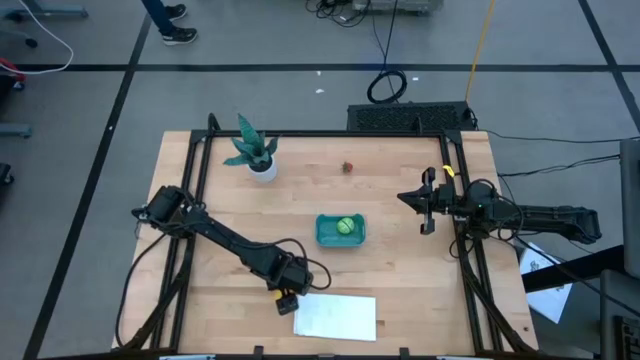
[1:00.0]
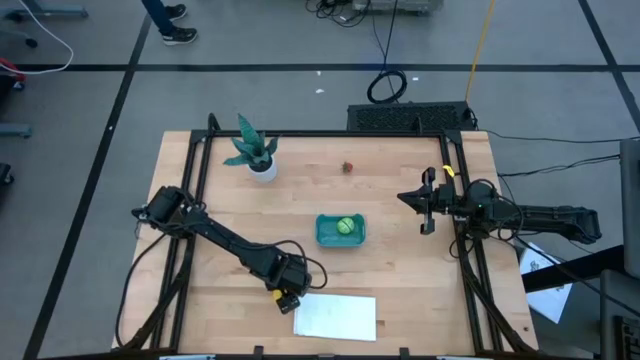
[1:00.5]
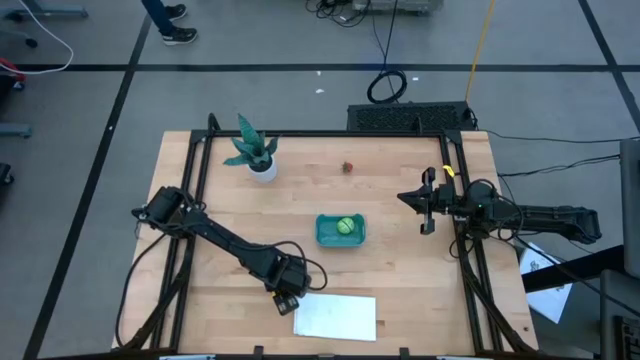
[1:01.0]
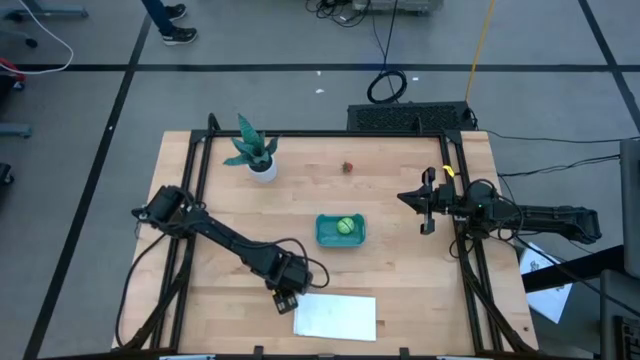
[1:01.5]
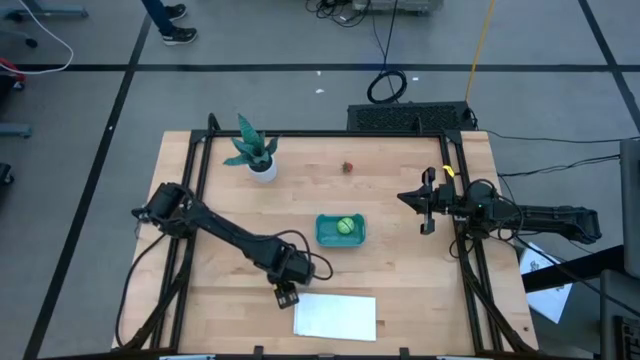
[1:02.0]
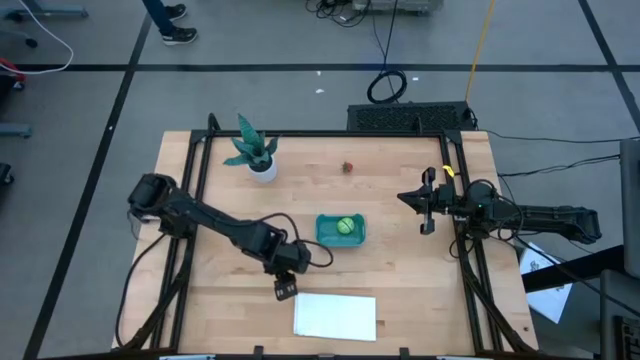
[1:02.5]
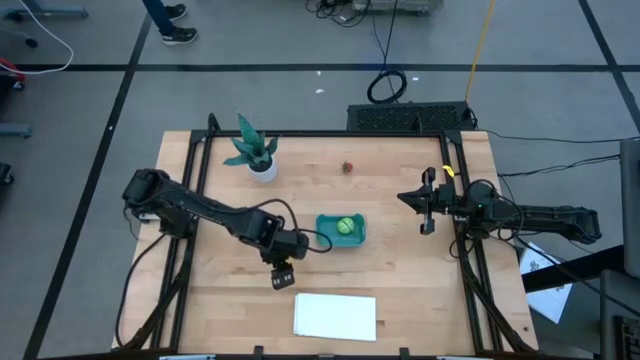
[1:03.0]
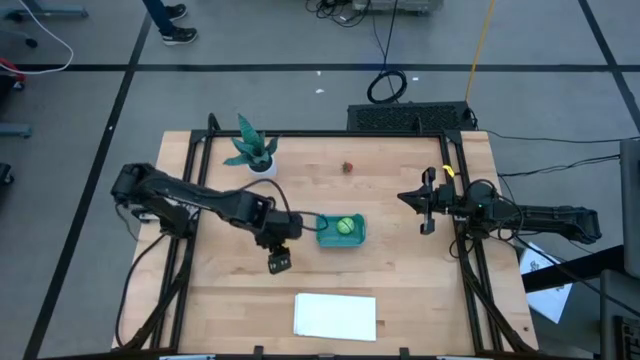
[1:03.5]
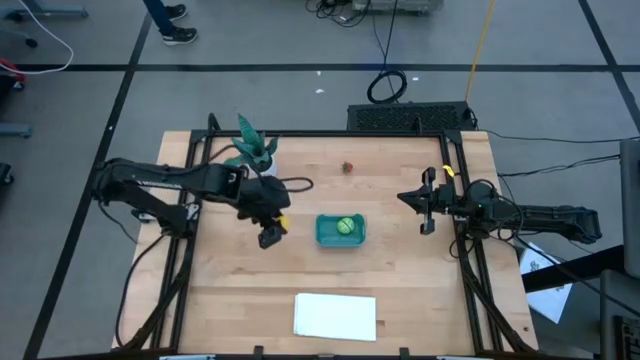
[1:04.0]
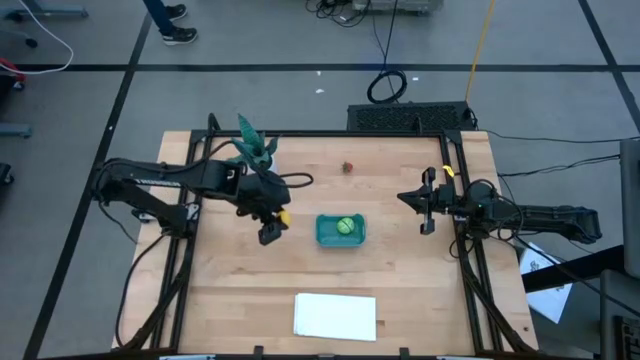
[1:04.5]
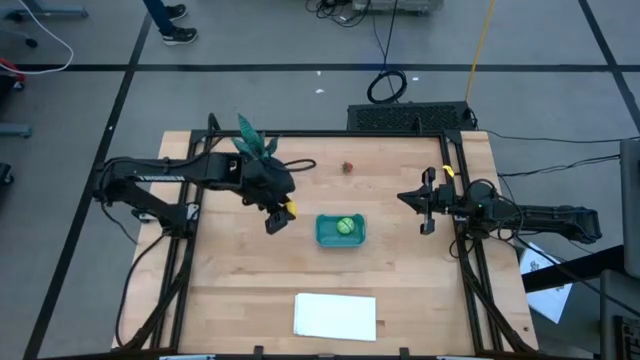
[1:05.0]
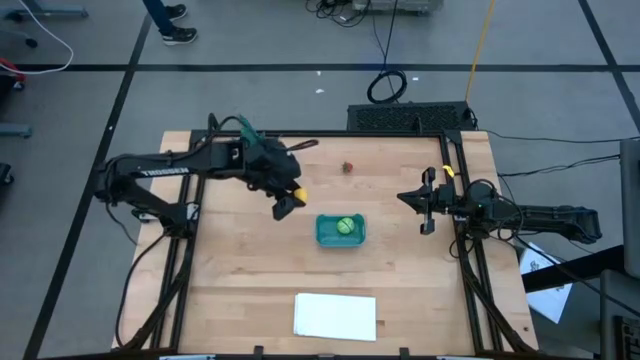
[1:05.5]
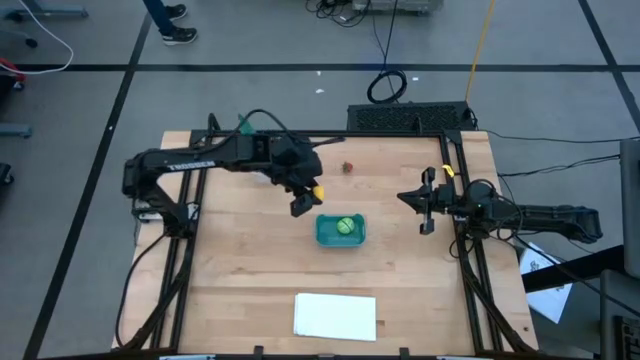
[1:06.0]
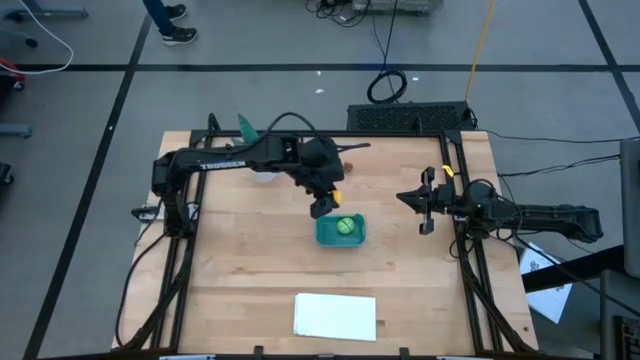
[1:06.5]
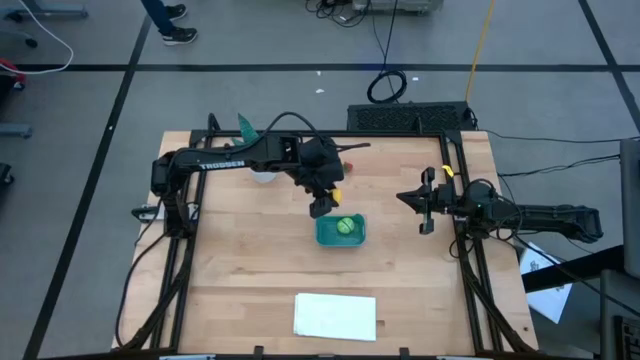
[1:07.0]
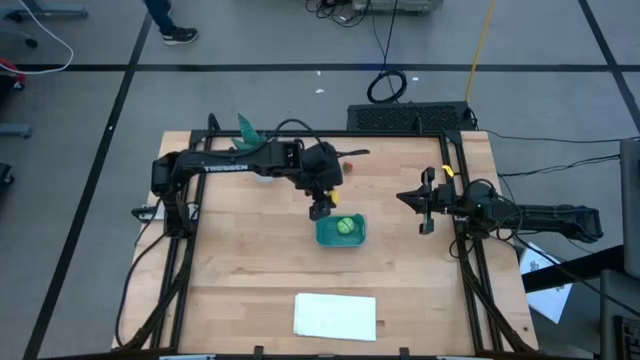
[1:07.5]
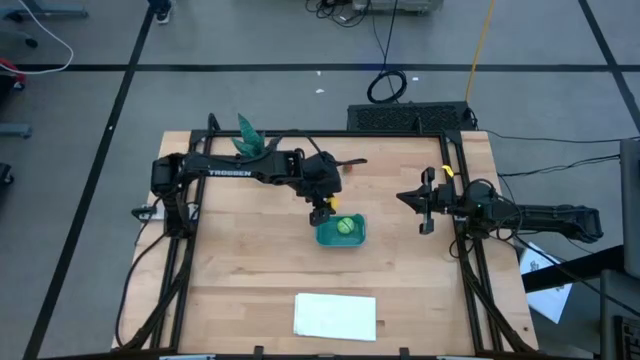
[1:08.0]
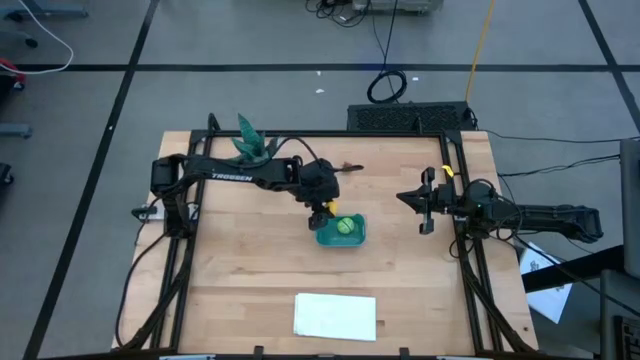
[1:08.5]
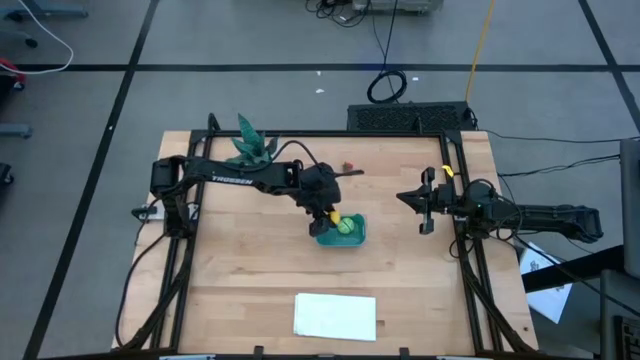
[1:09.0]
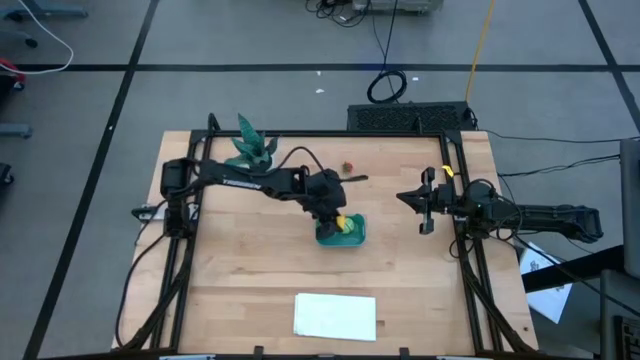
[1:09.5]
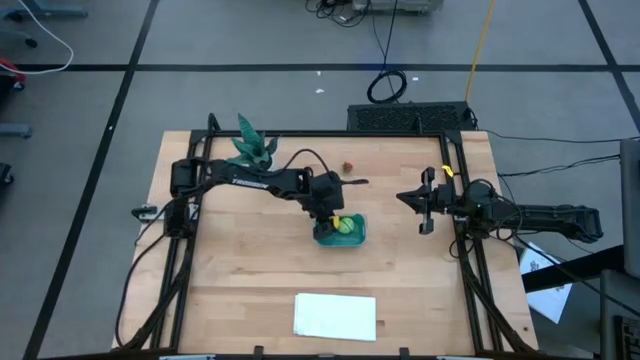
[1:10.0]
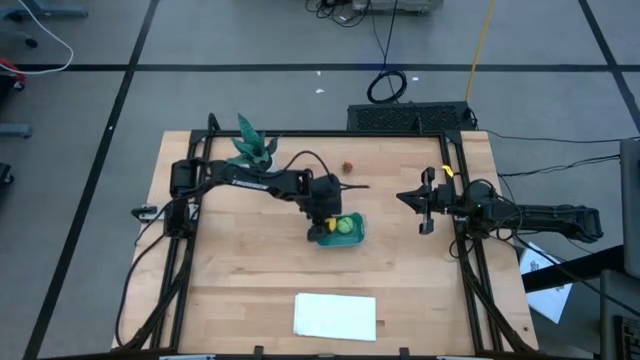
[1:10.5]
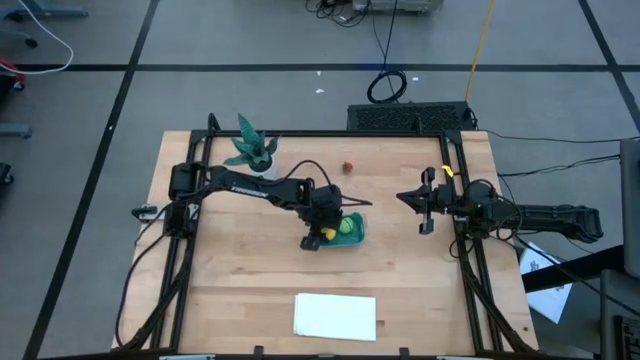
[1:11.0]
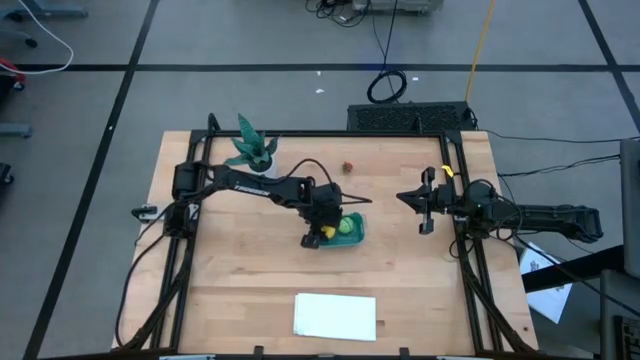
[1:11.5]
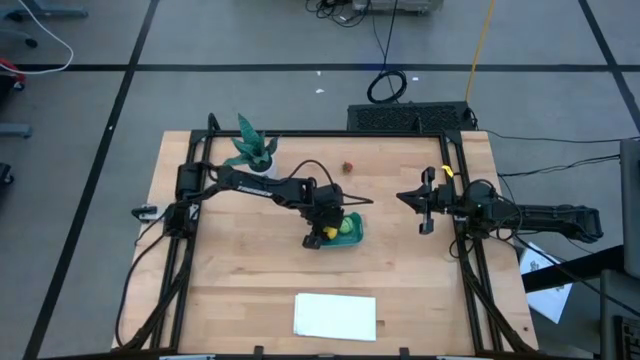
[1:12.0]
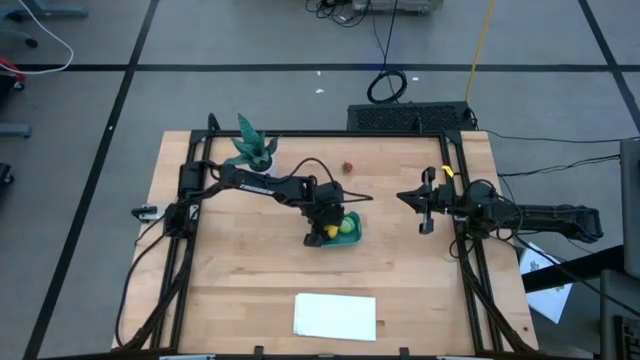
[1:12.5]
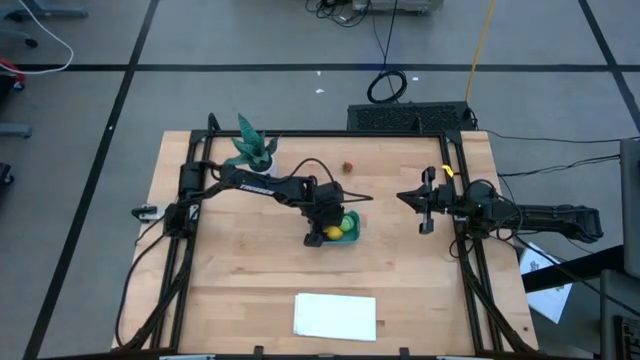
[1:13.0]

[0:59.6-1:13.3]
Task: Pick and placing Produce into tupperware
Put the yellow lemon into the blue bin
